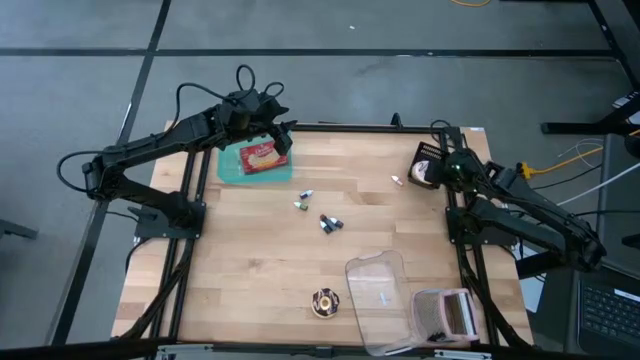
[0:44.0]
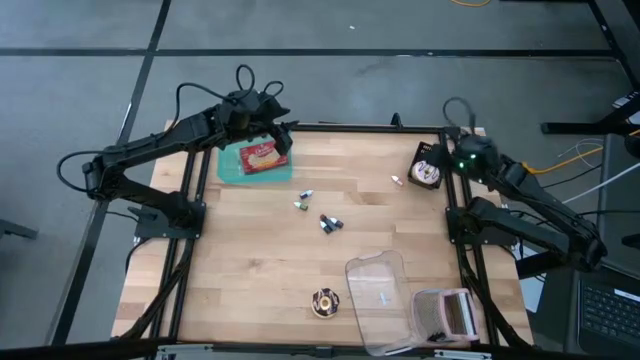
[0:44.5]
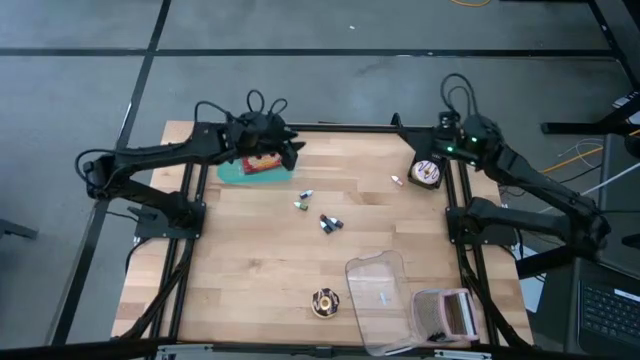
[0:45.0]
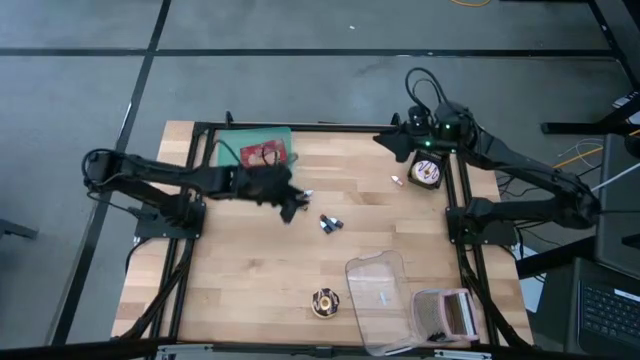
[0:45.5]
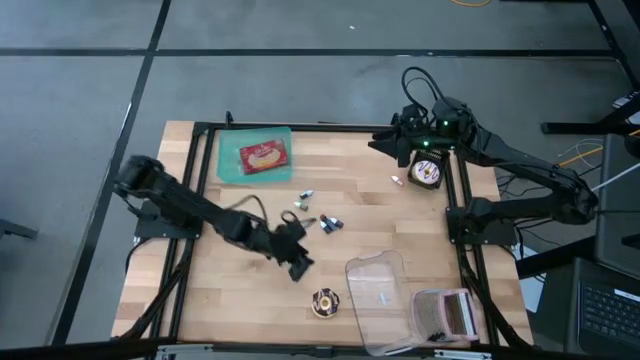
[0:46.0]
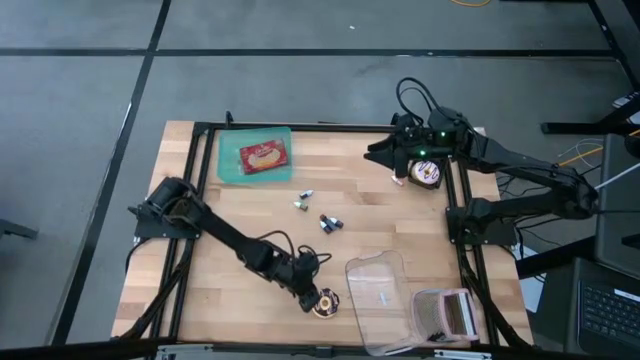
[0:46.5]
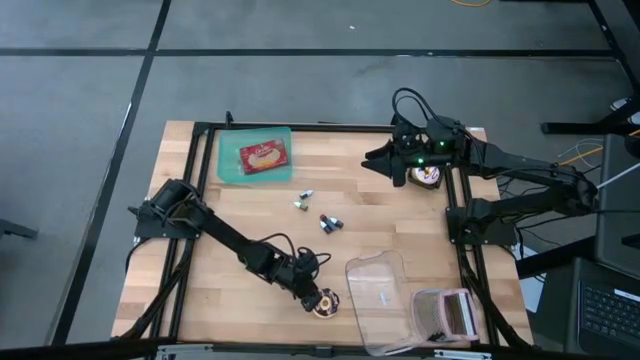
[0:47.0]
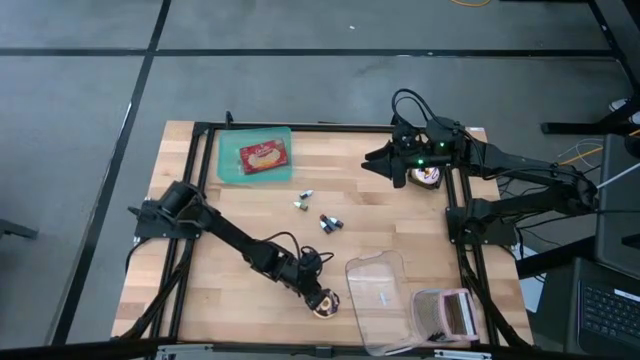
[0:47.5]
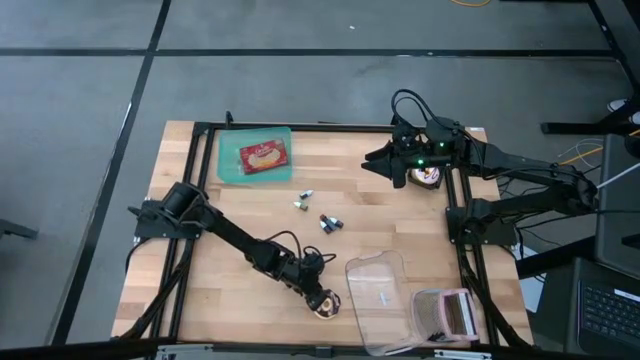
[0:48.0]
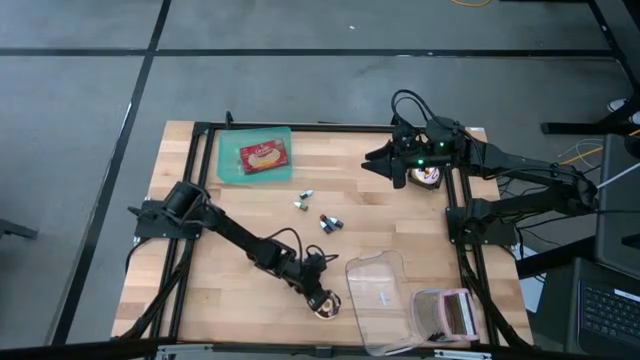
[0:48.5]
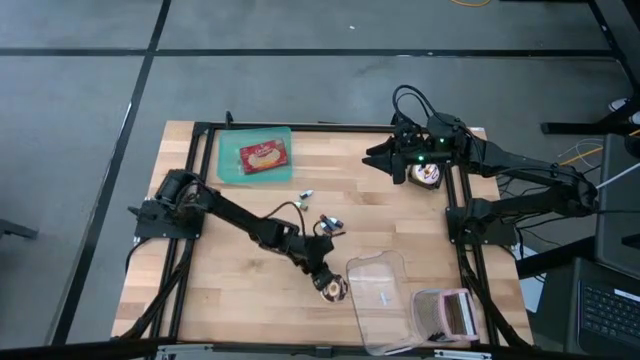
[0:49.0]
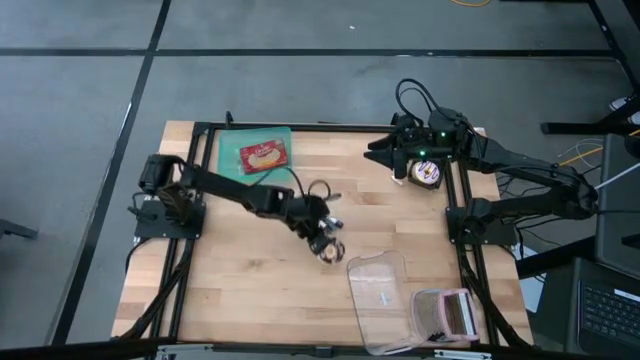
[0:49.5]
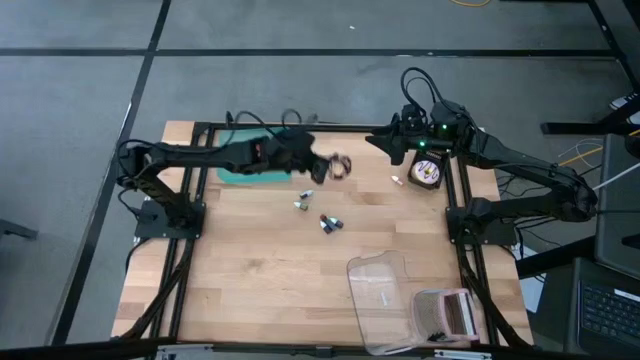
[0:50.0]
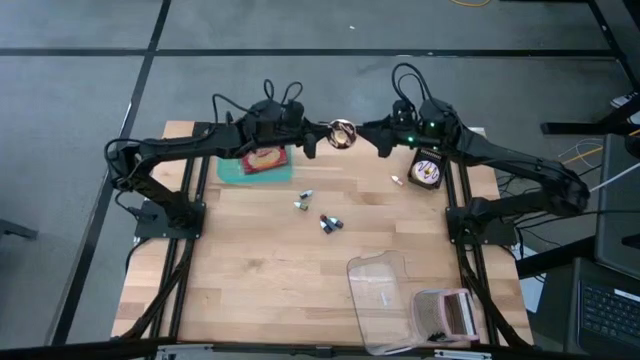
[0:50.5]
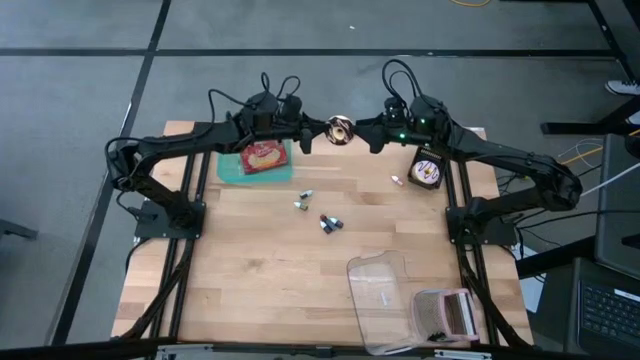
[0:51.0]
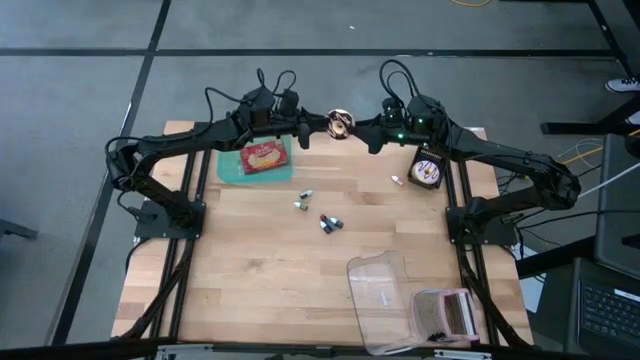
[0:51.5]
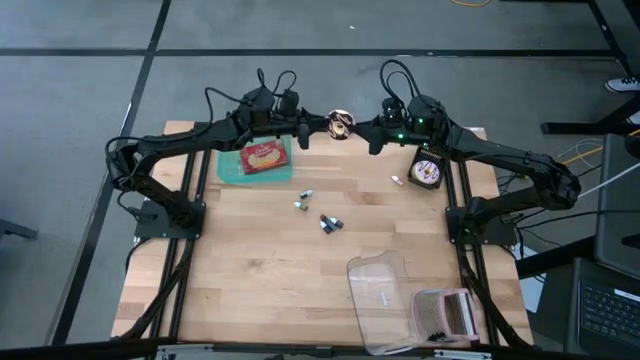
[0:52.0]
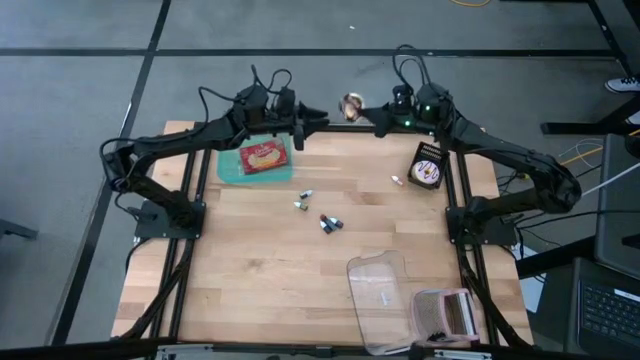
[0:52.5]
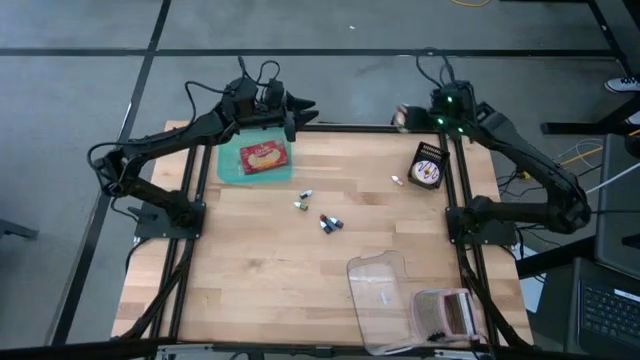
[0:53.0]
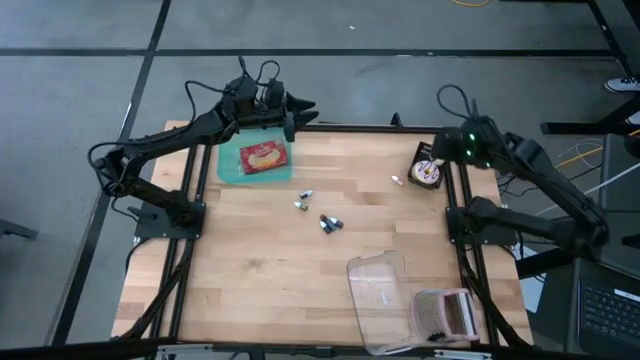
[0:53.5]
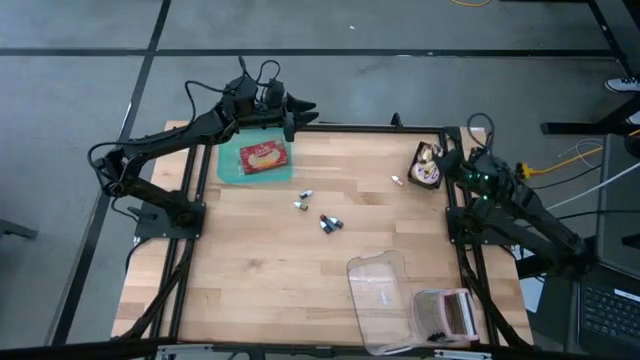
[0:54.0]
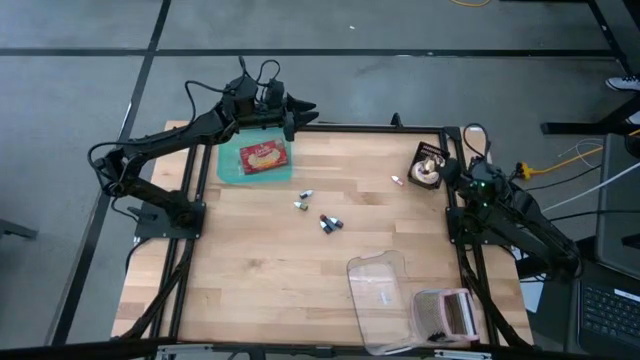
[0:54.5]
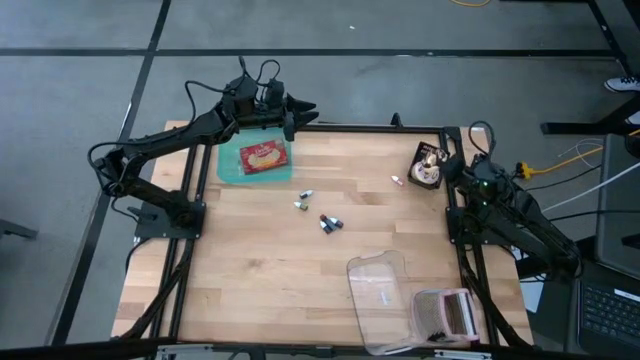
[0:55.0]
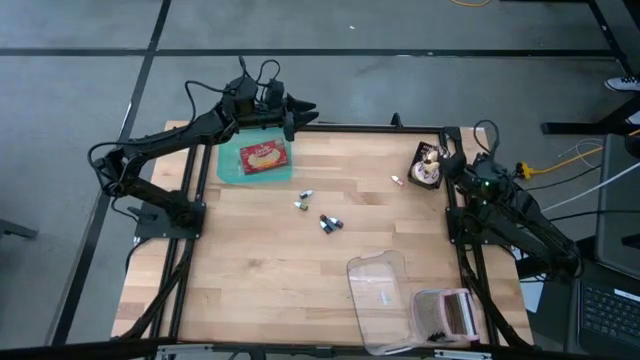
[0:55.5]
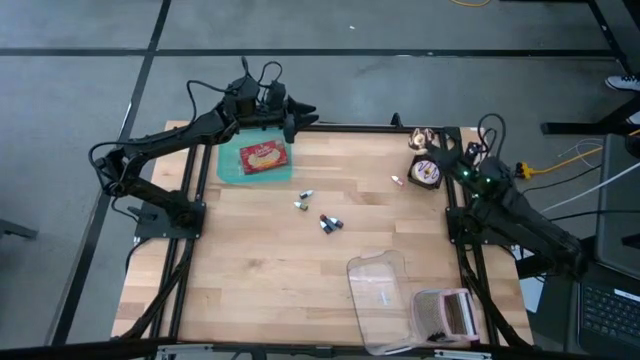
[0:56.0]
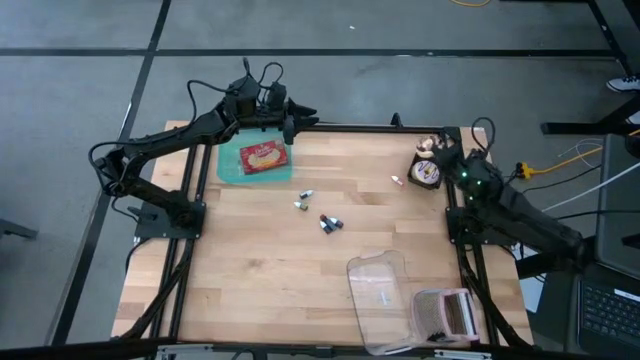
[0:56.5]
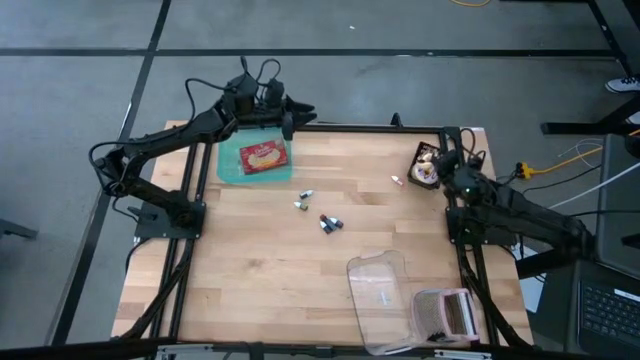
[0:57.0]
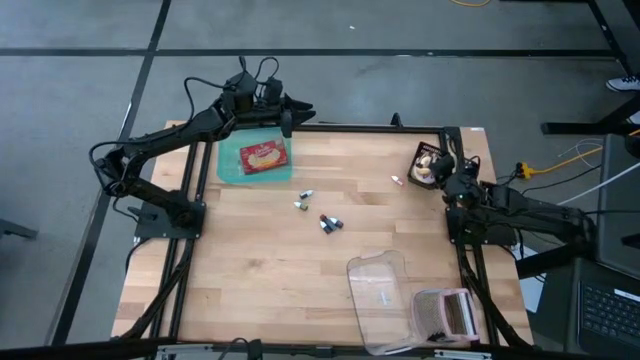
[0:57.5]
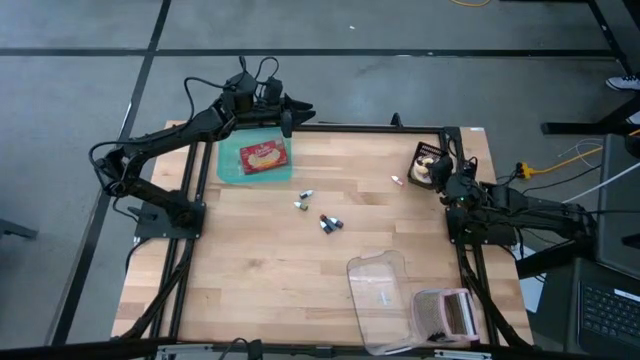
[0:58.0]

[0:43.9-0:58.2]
Put the black donut into the black bin

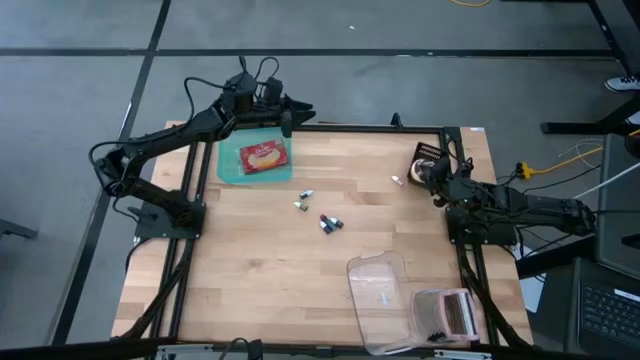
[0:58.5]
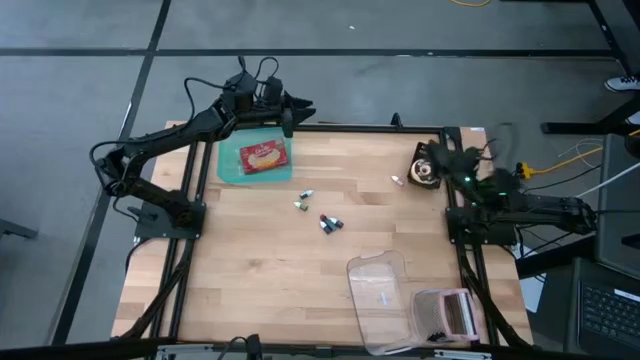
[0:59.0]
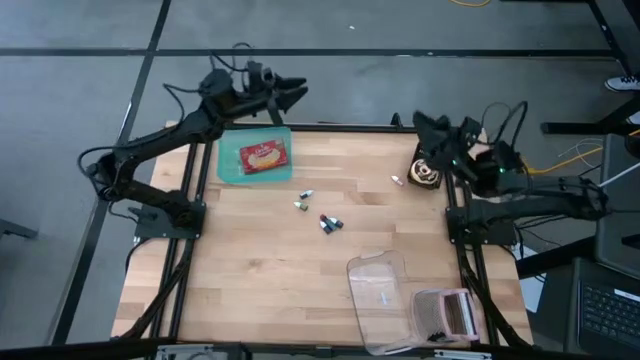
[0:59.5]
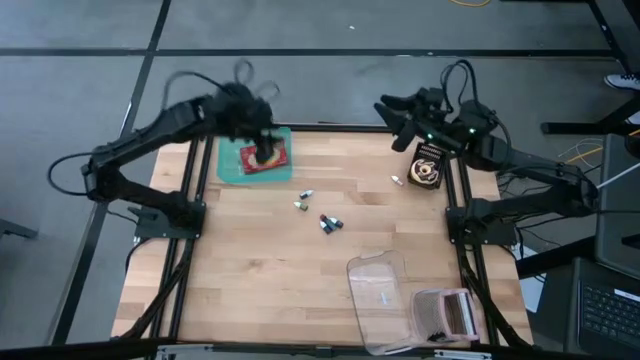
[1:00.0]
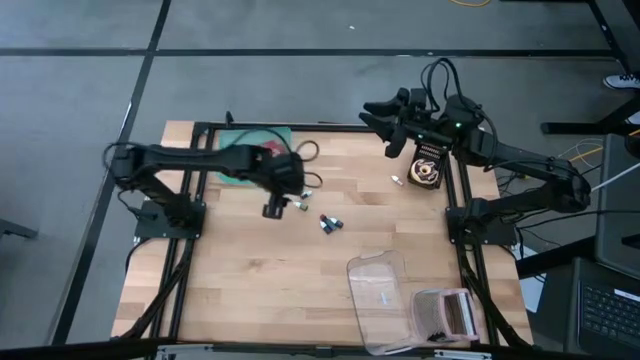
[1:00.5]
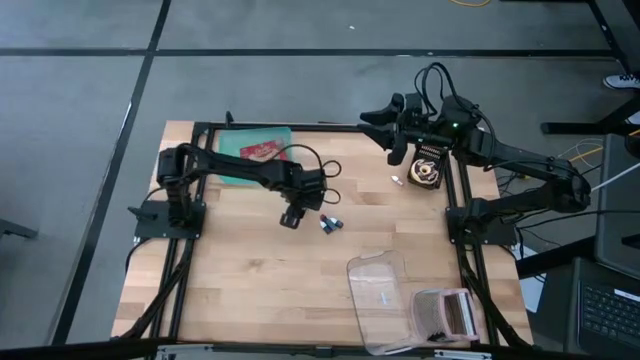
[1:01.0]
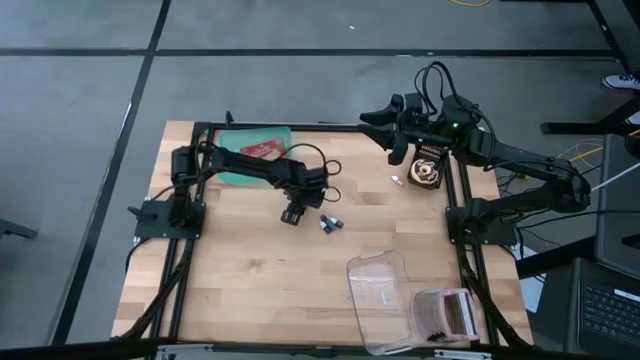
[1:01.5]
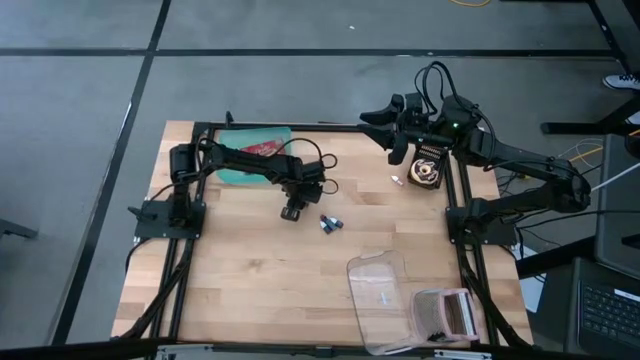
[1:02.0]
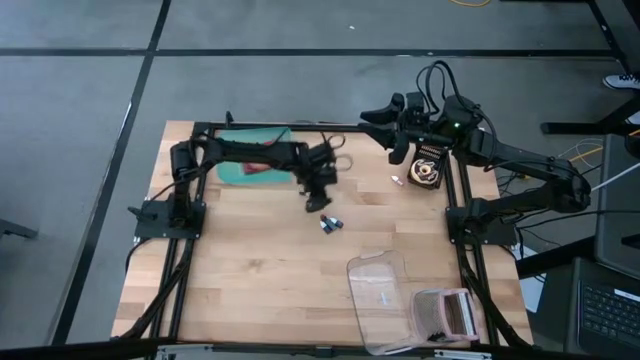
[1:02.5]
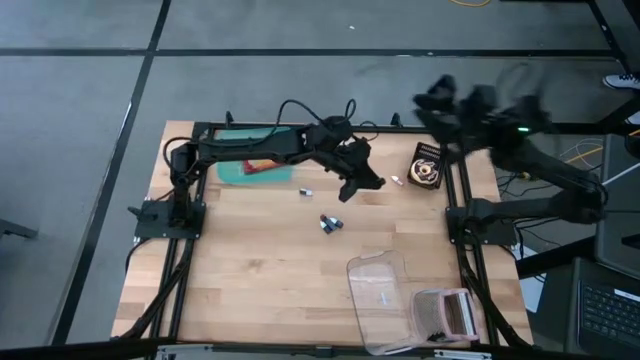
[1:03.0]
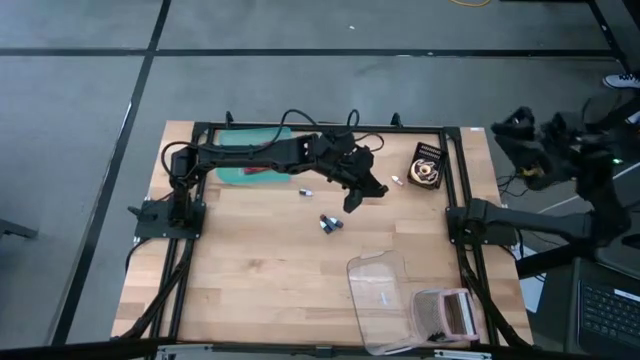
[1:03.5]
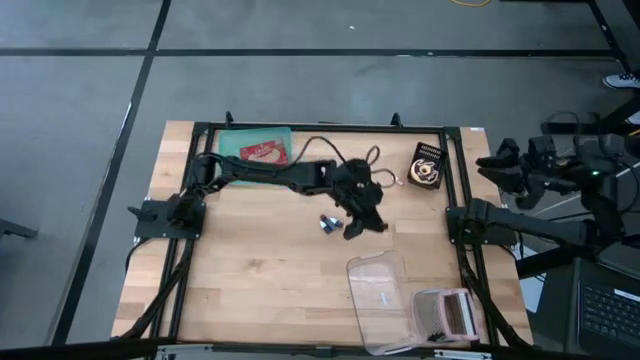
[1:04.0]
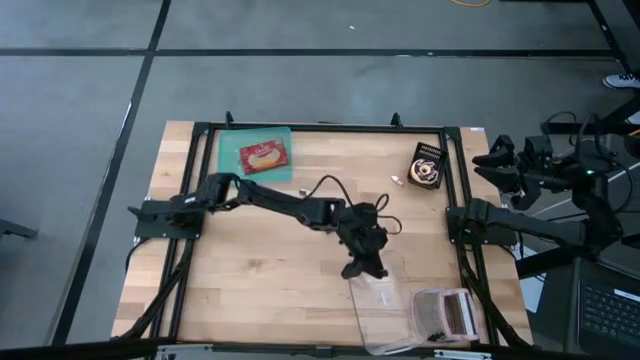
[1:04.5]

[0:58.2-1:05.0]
Put the green food coloring bottle into the transparent bin
